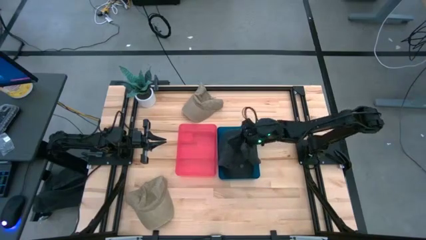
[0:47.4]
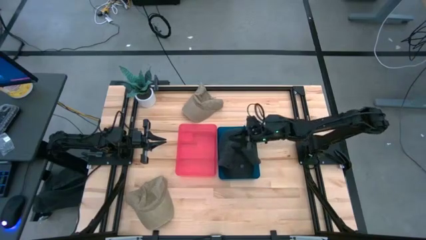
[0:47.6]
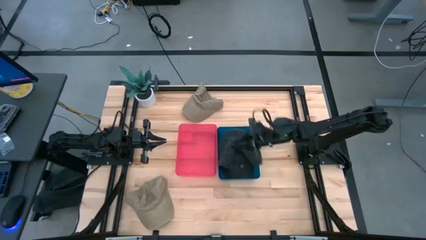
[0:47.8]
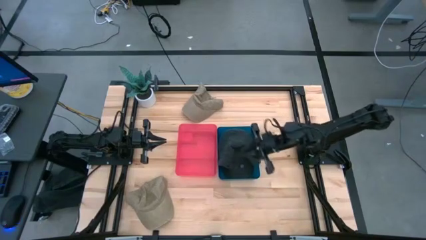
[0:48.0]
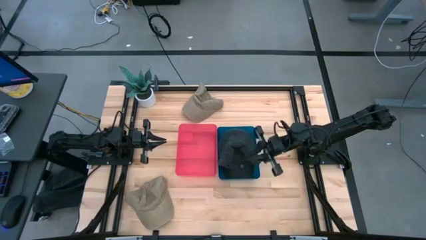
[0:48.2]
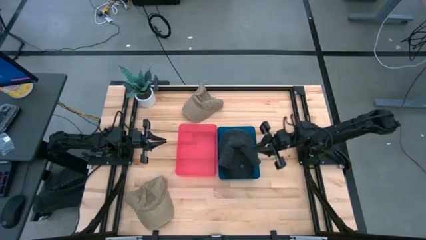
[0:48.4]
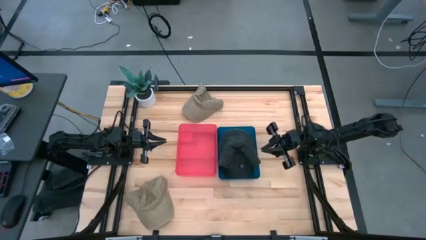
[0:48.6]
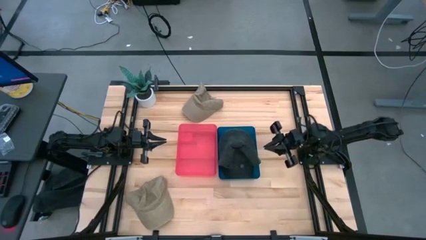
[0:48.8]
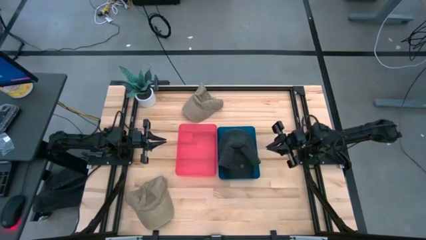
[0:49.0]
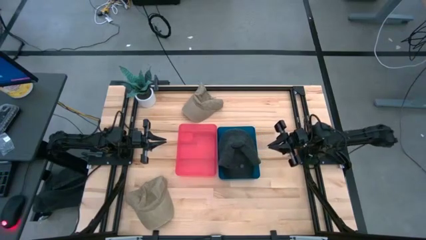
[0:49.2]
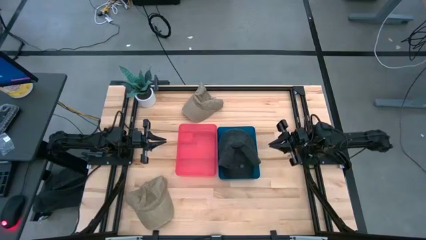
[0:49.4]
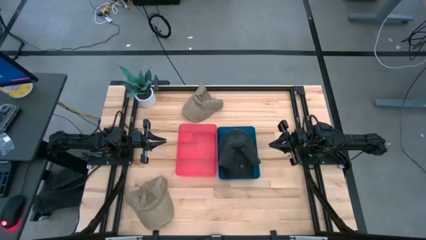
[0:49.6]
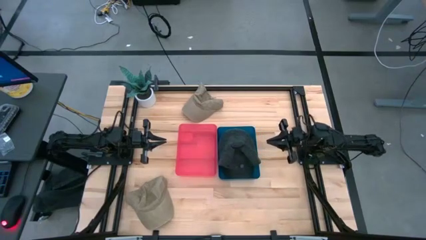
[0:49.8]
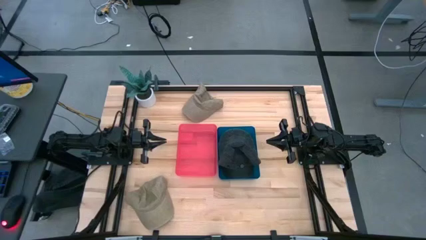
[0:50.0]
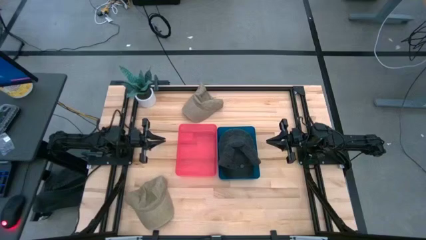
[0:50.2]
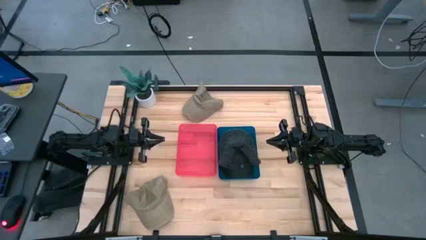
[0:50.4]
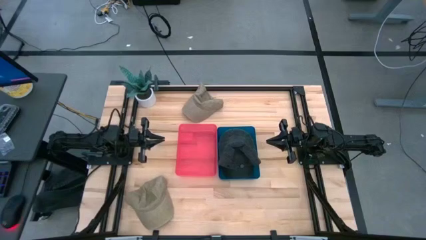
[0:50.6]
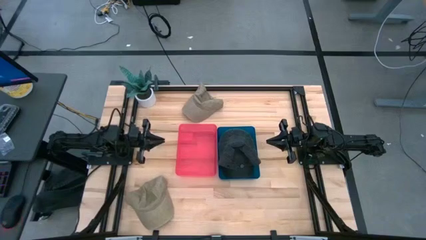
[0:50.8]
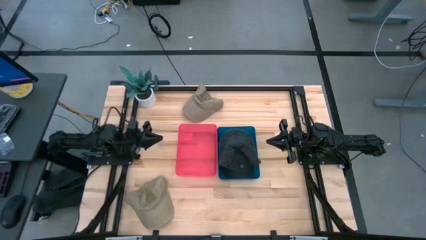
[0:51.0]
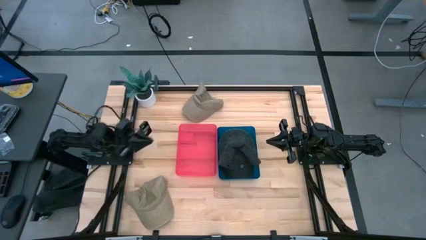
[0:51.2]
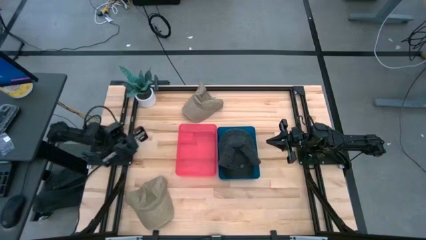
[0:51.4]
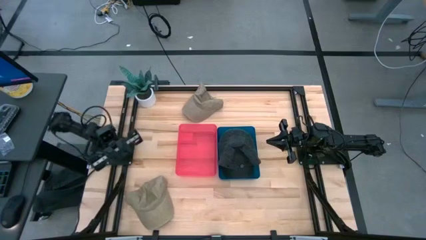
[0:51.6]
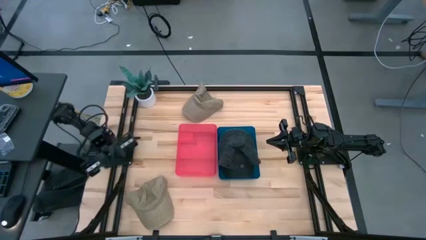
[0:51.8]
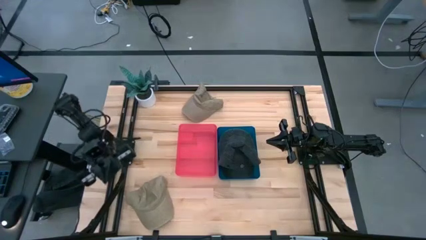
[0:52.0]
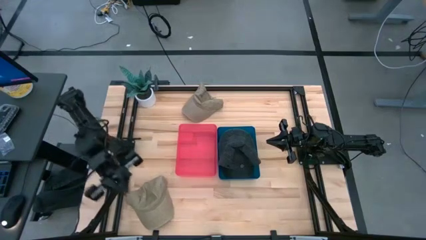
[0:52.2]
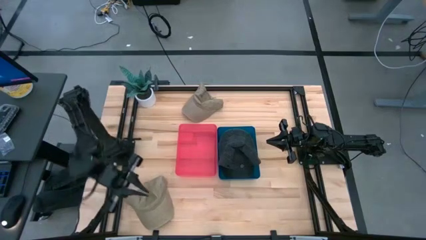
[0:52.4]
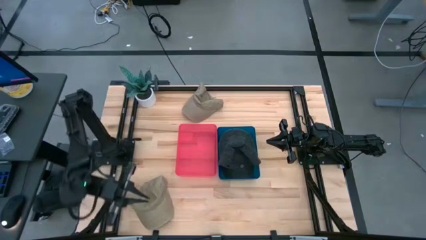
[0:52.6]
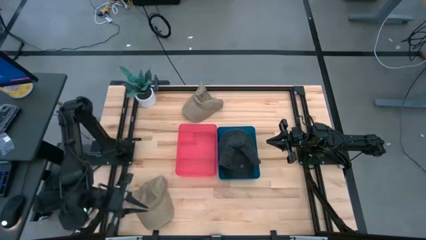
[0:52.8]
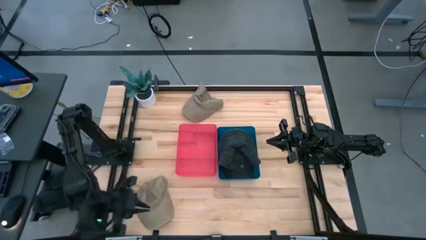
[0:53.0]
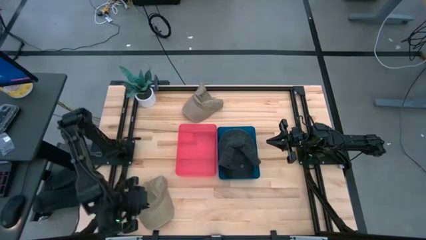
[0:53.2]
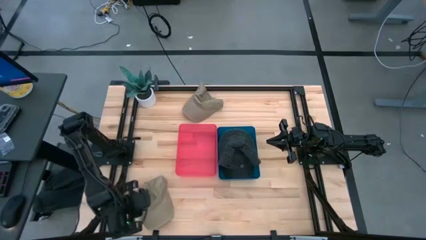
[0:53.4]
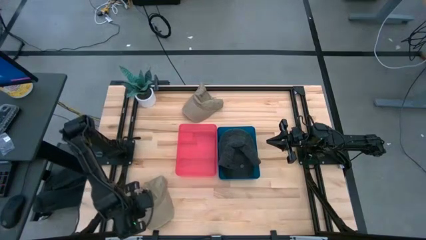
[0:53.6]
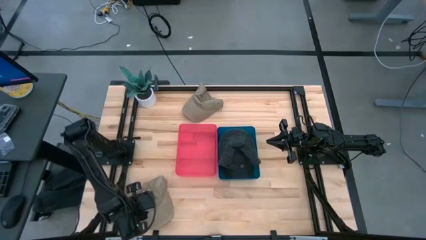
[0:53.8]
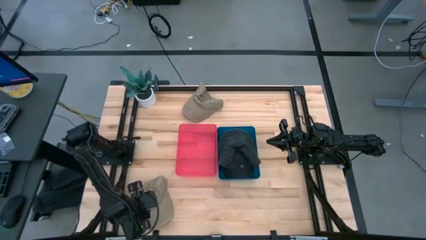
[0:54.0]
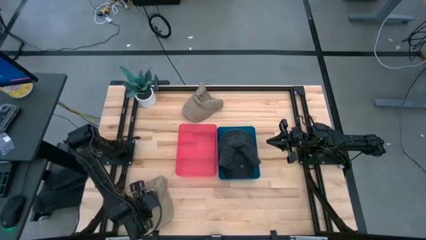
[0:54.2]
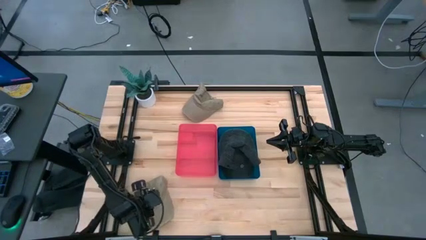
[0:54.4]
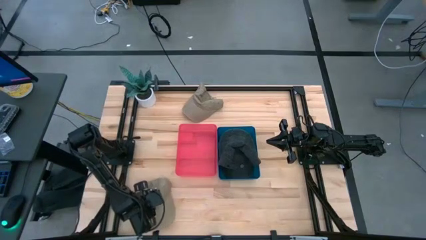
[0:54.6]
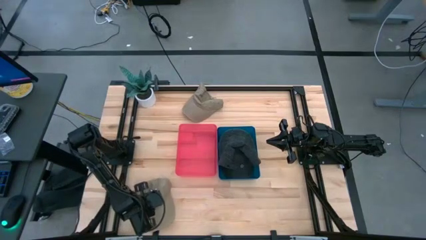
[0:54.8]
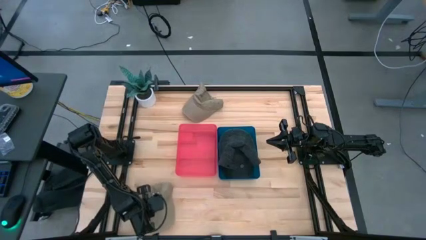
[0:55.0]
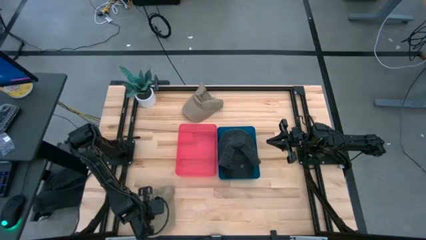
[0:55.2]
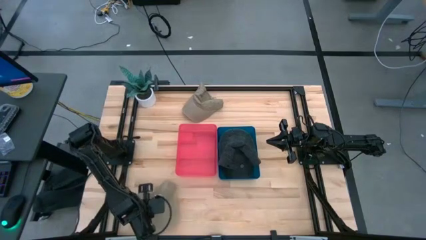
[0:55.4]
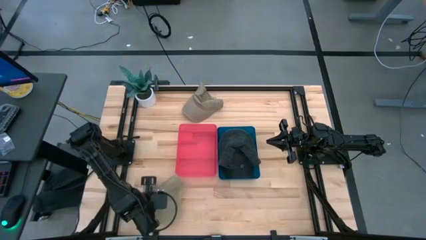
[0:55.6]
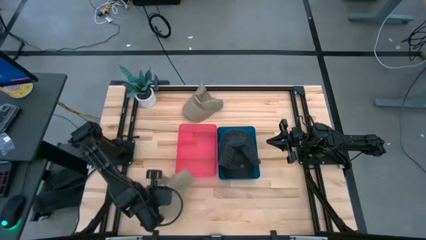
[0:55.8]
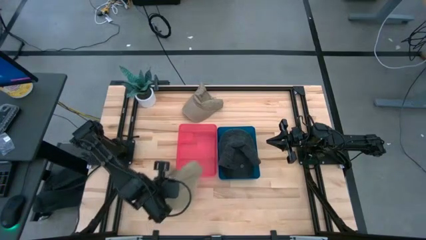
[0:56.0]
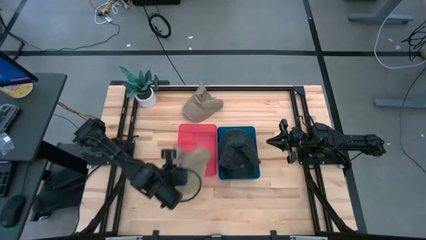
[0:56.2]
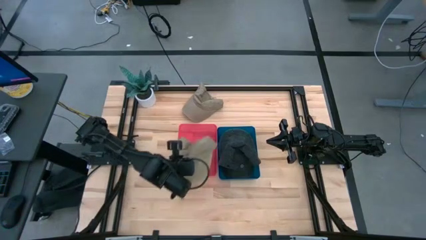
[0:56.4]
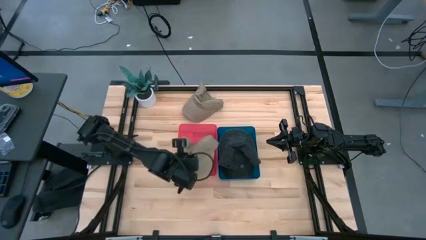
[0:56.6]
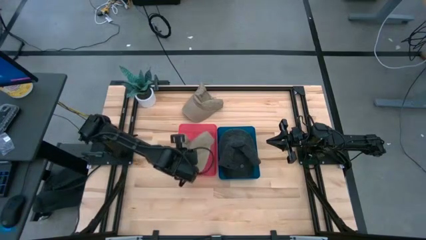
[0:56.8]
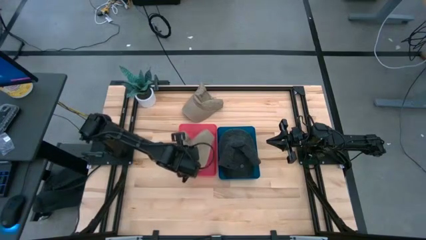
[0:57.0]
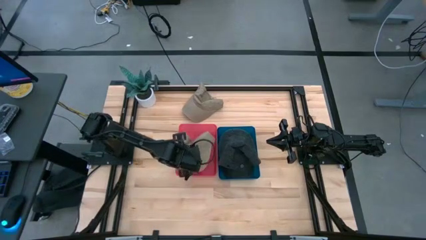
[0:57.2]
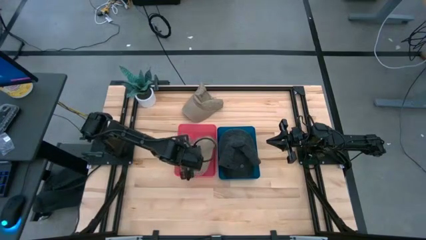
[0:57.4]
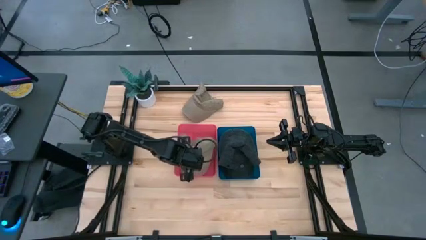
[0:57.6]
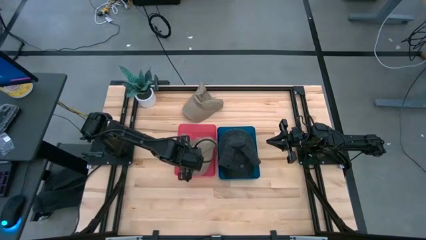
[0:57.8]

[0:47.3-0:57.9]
Task: Pick & Place hat
Put the bottom brown cap into the red bin

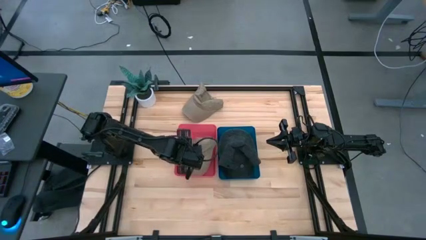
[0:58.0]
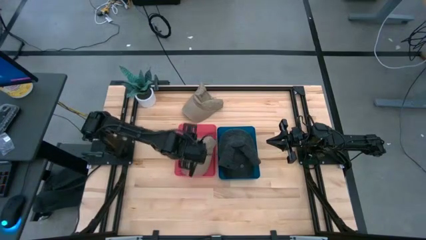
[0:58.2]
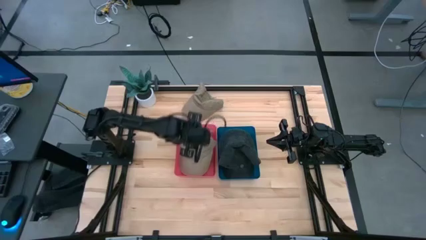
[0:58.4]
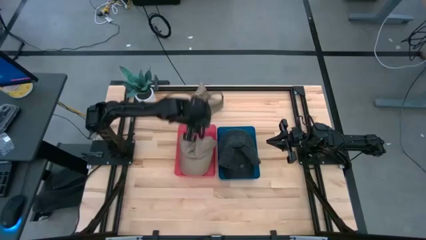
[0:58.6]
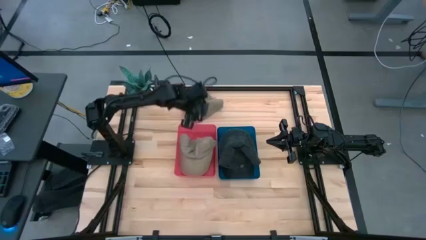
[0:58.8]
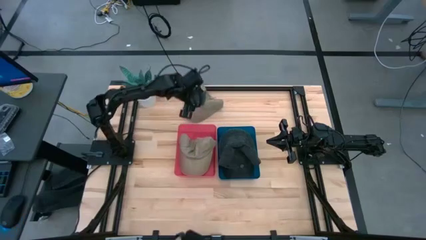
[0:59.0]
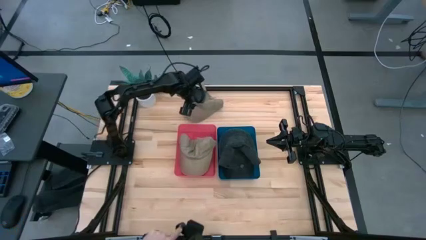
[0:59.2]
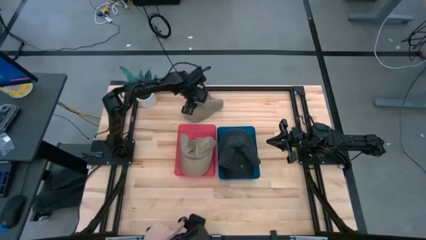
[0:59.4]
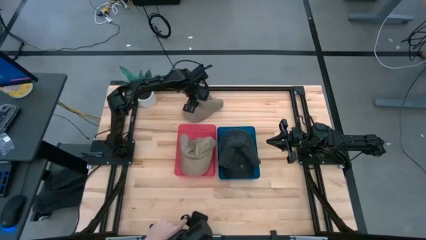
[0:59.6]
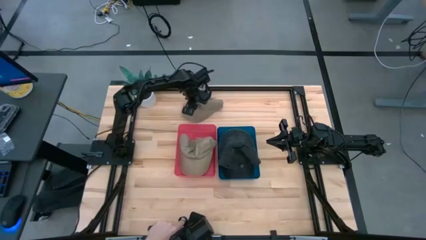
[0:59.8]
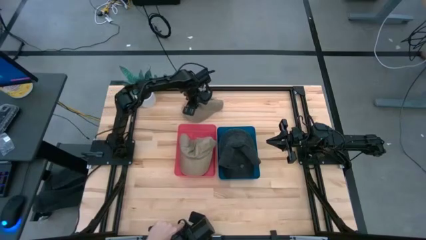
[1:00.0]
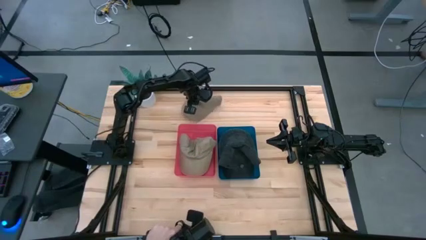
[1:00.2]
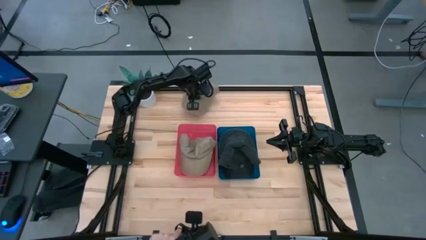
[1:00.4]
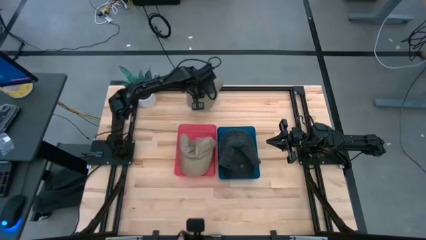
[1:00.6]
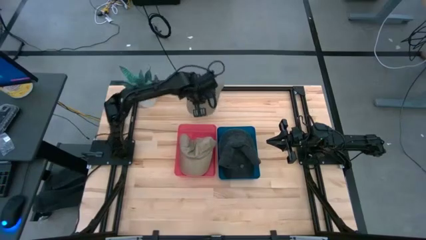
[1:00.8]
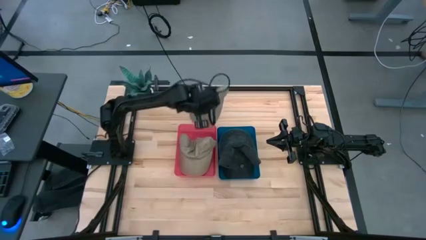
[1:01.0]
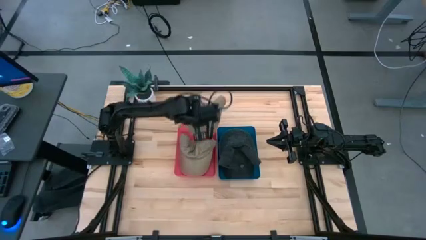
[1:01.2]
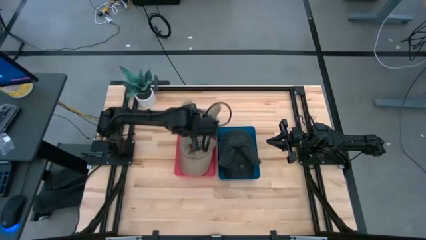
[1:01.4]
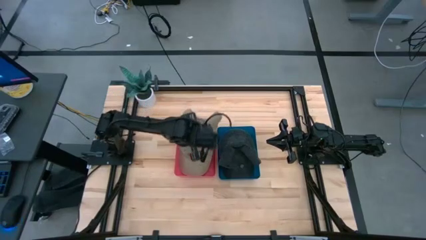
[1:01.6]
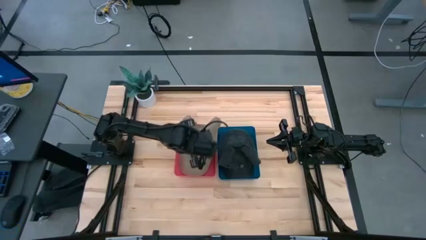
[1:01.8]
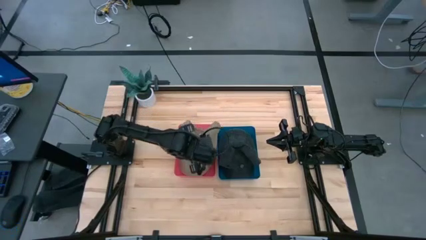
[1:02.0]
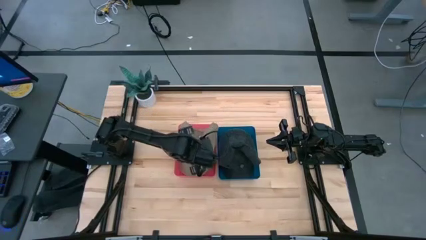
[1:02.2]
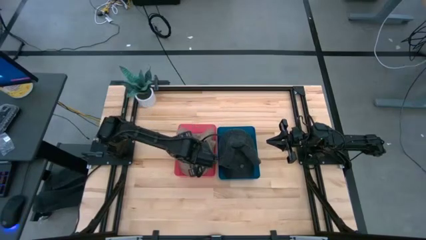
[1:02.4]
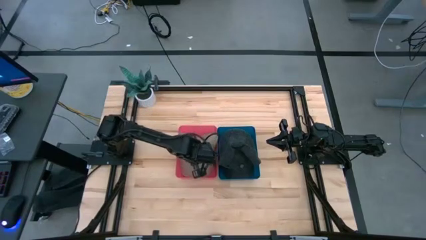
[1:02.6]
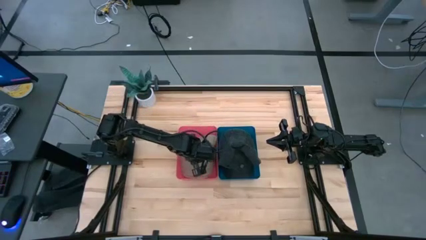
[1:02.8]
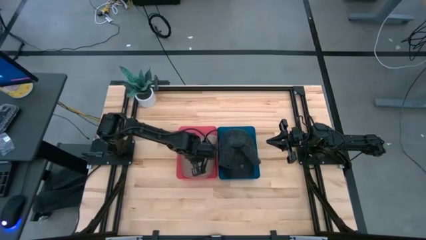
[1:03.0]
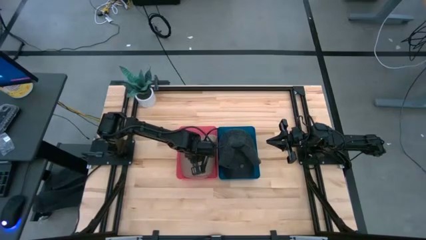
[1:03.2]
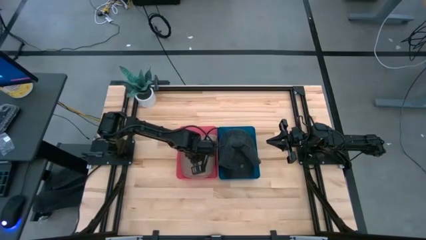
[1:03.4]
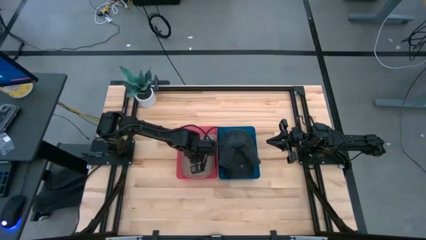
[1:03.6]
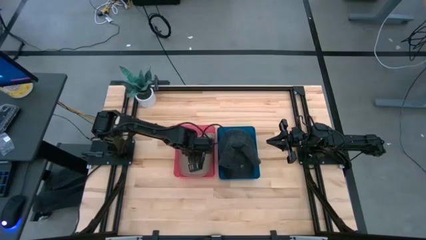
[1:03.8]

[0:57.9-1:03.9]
Put the brown cap into the red bin
